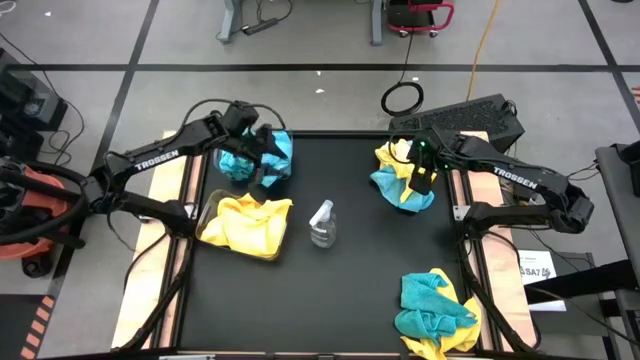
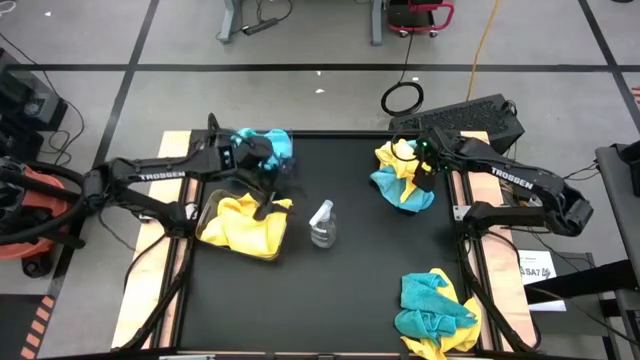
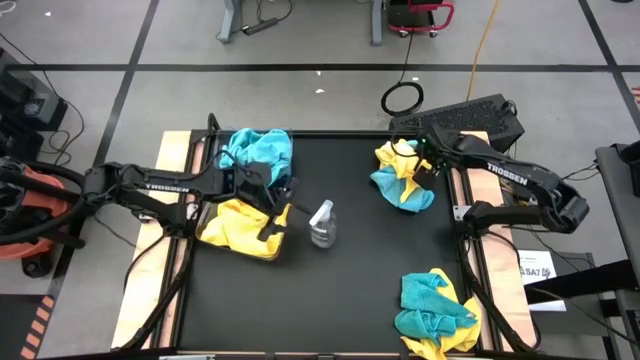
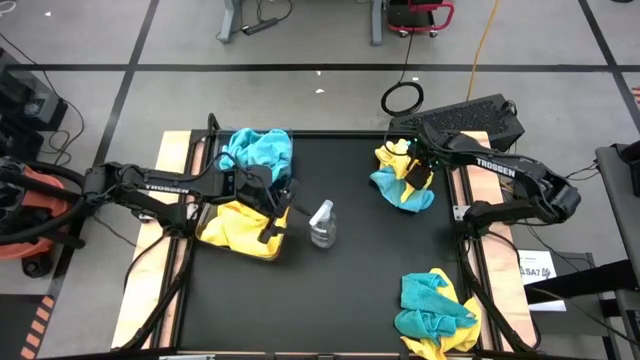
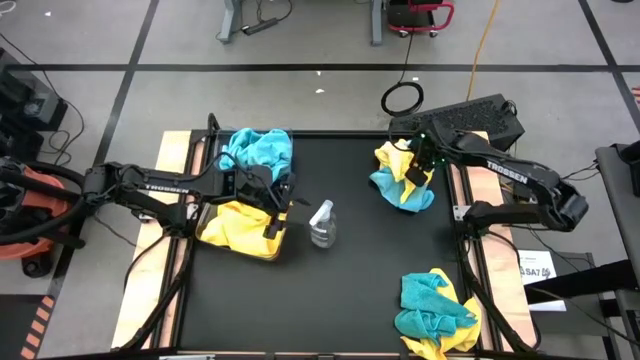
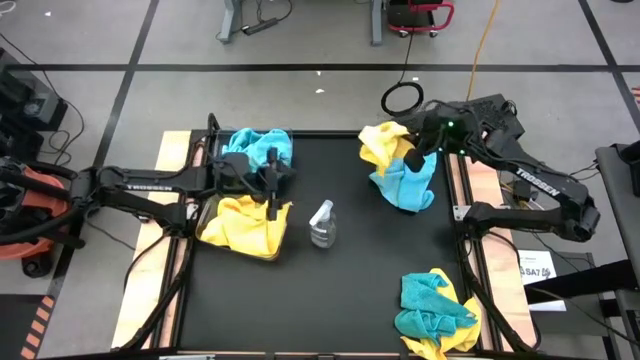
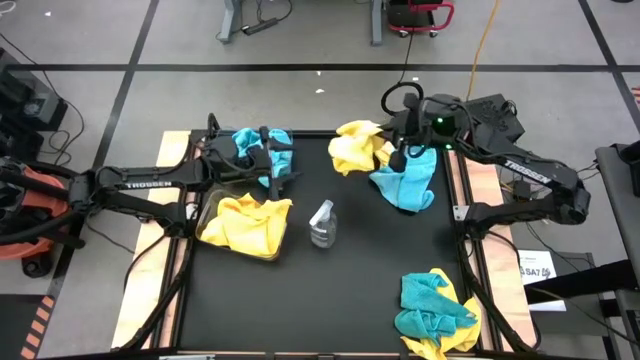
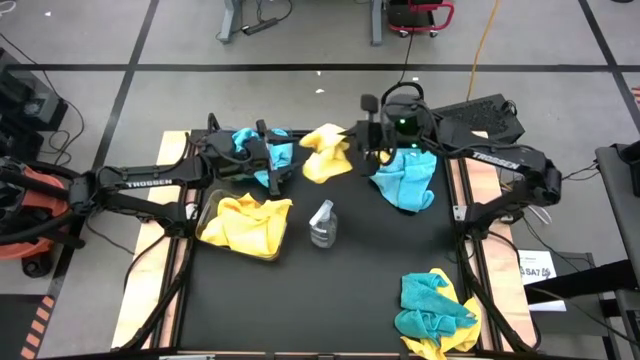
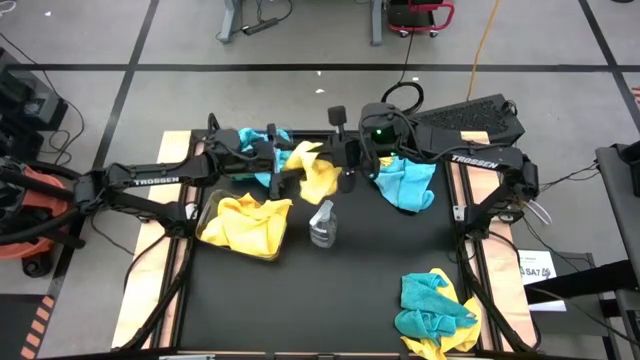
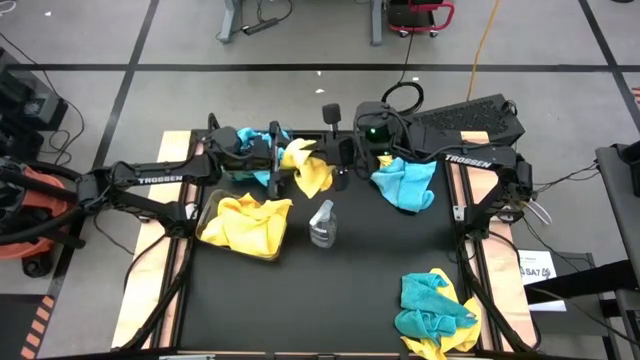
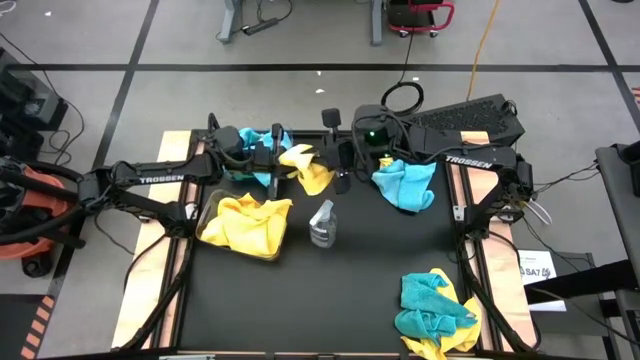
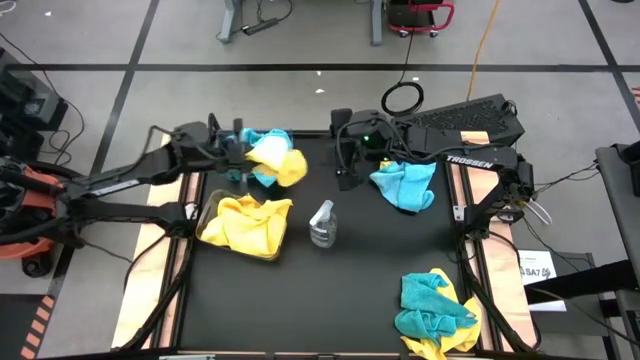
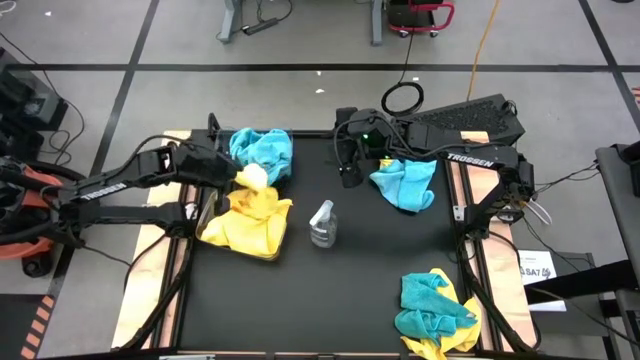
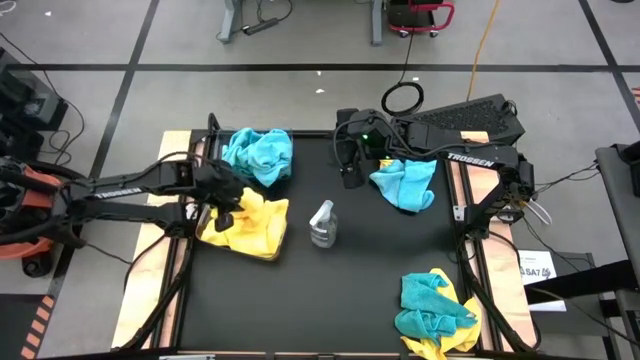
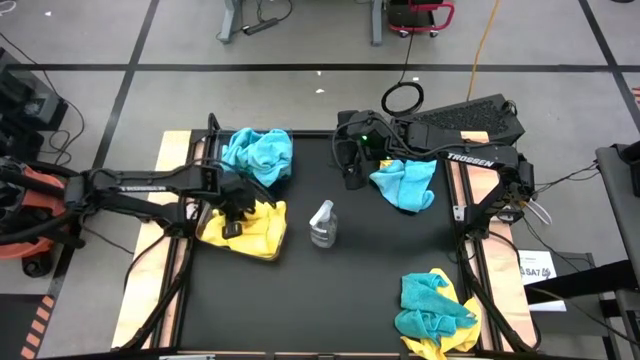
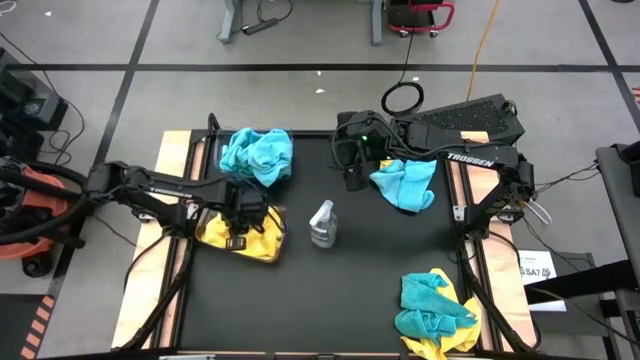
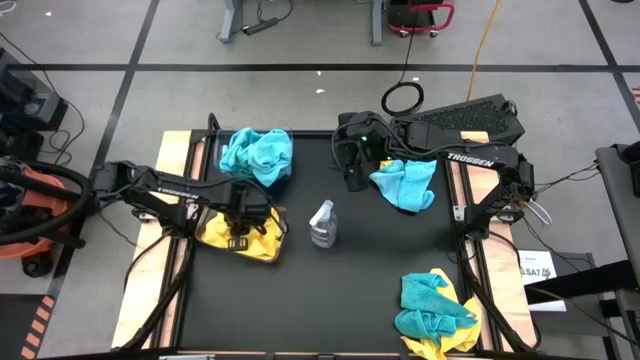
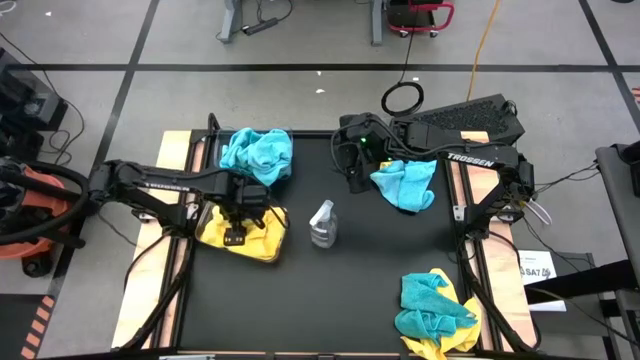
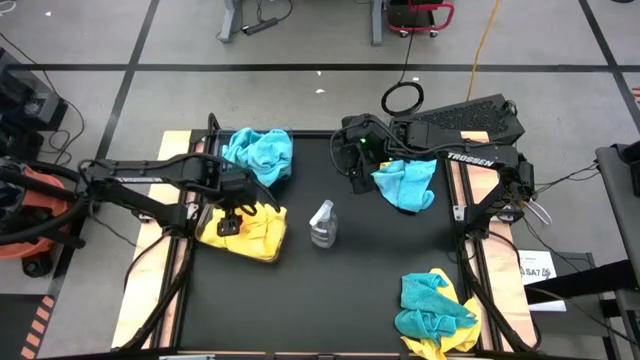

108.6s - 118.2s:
Task: Sort microfiber towel by color & place in baskets
Put the yellow microfiber cloth into the bottom transparent bin

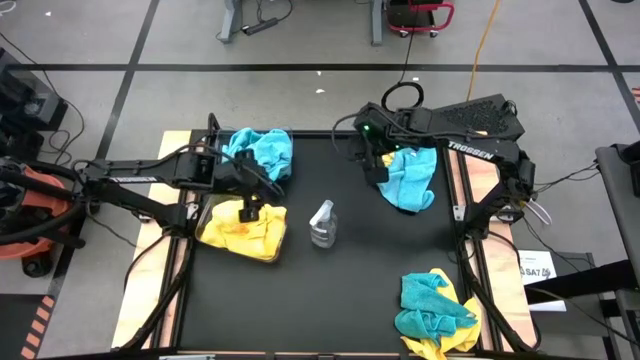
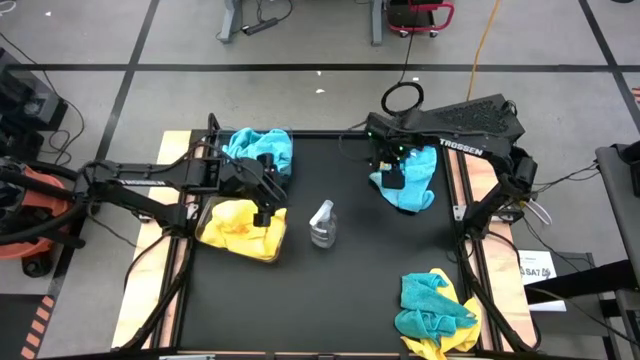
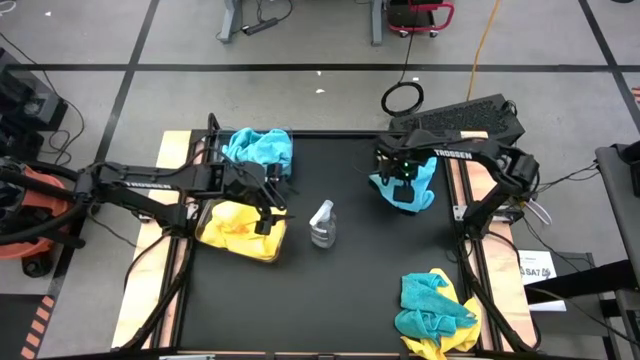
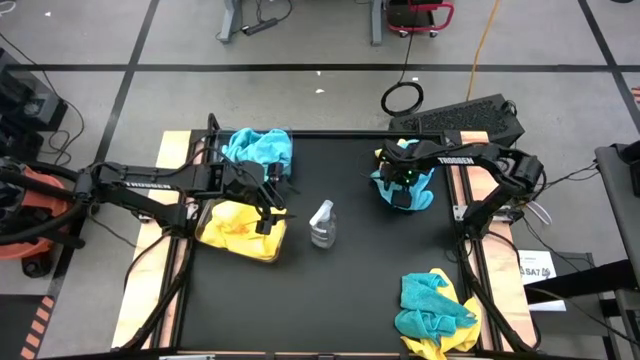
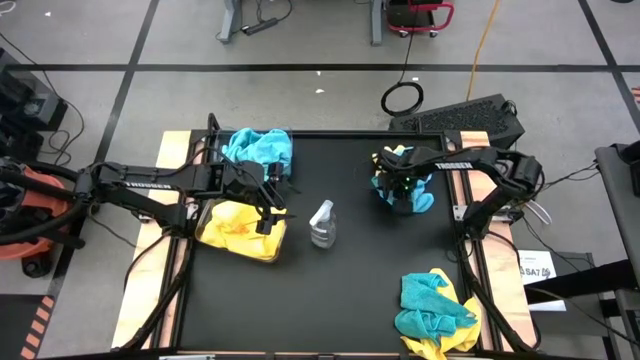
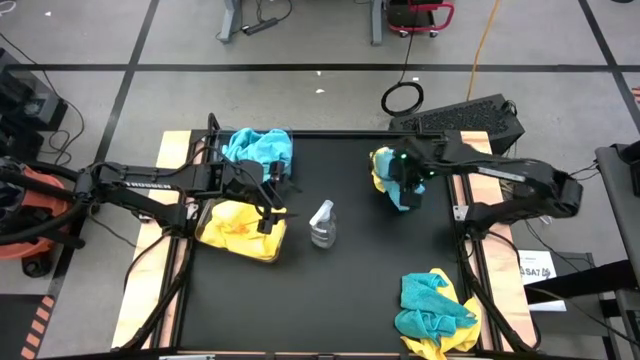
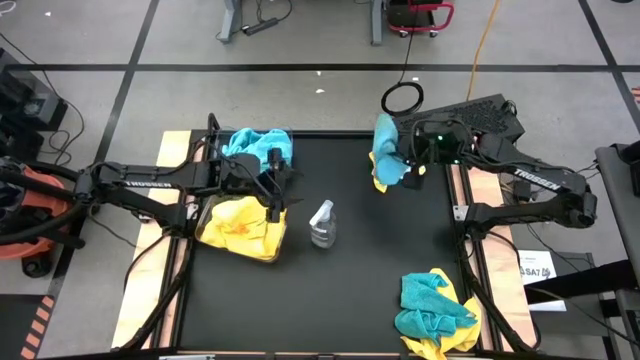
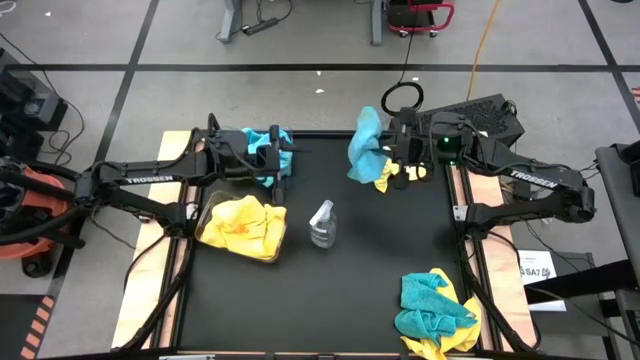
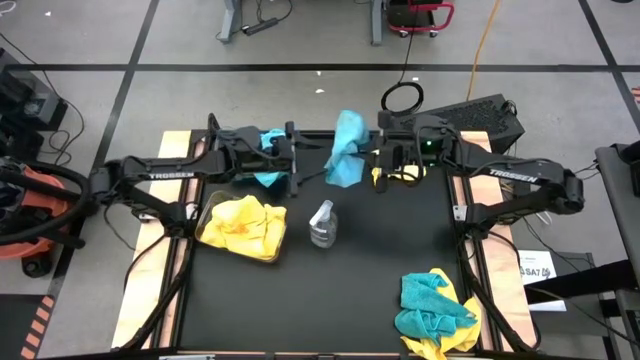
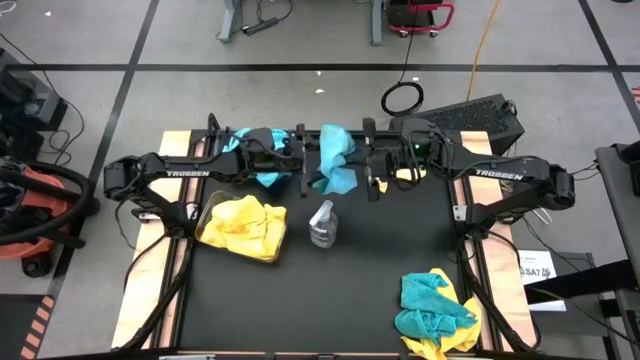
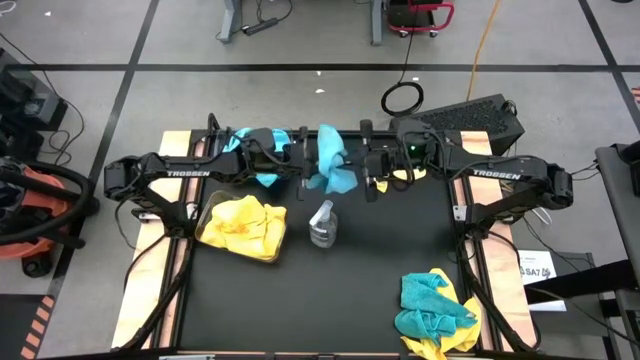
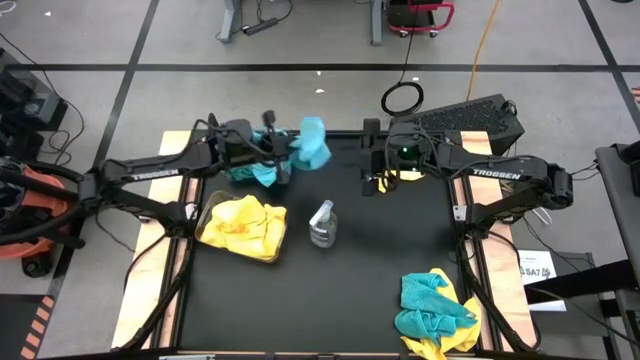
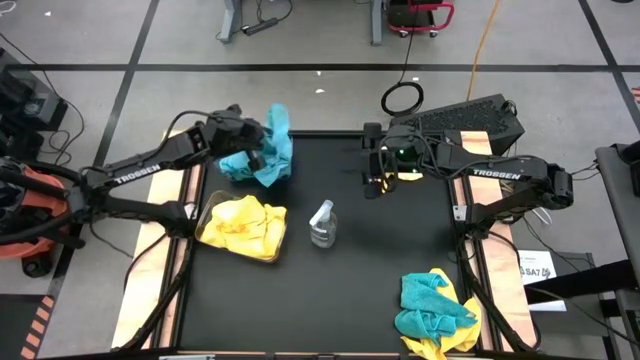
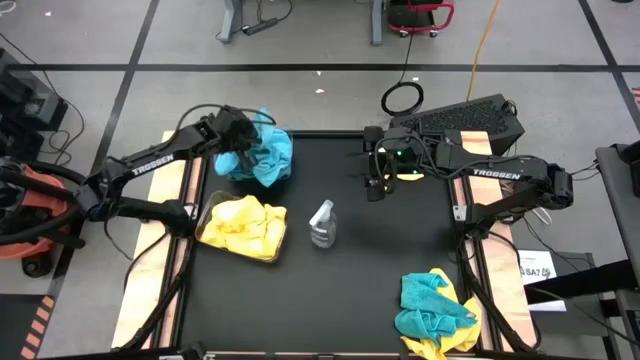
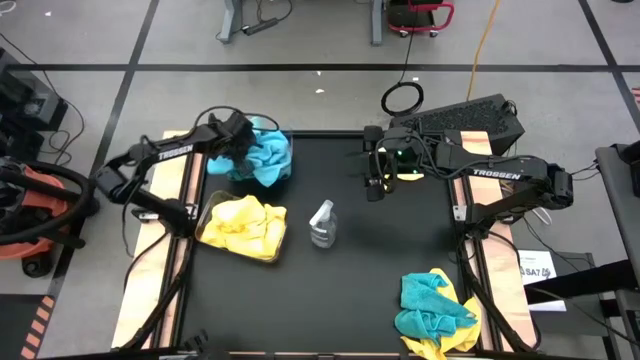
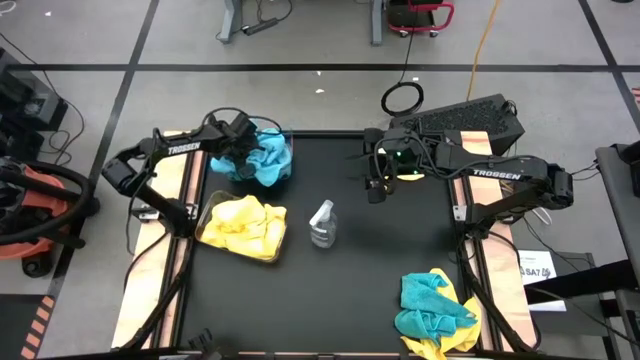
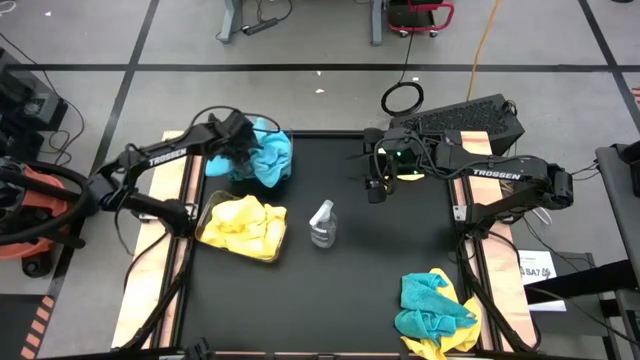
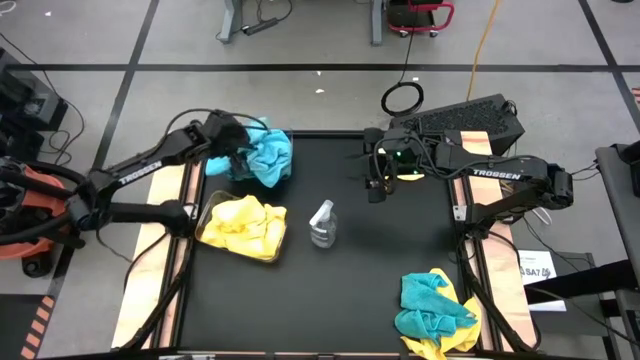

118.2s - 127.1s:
Put the blue microfiber cloth into the top transparent bin

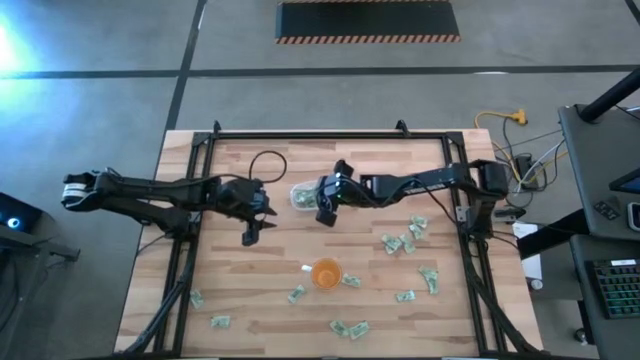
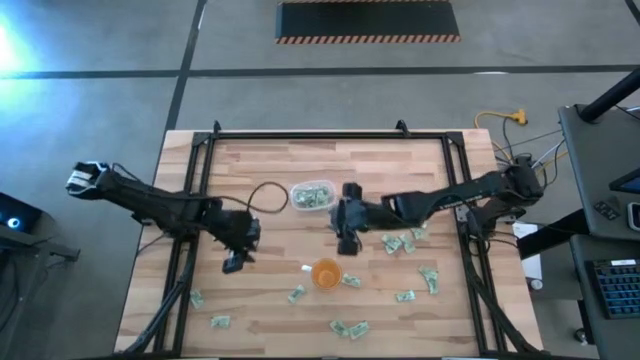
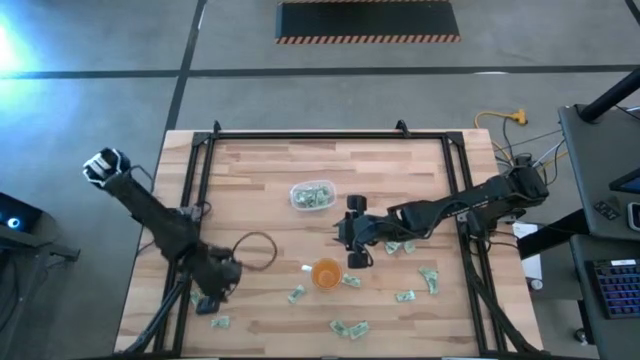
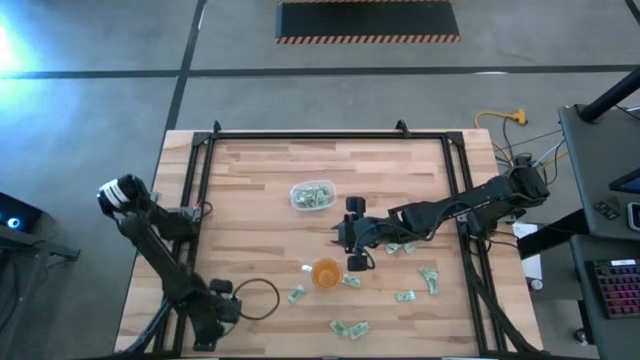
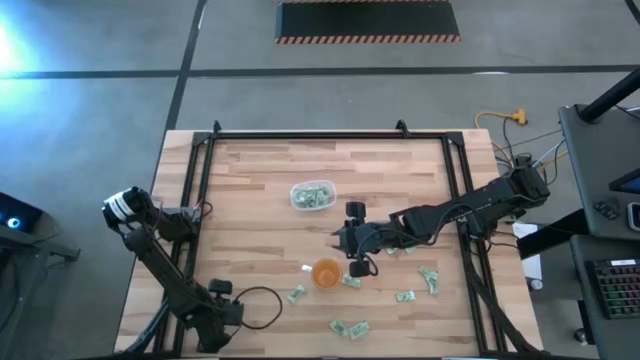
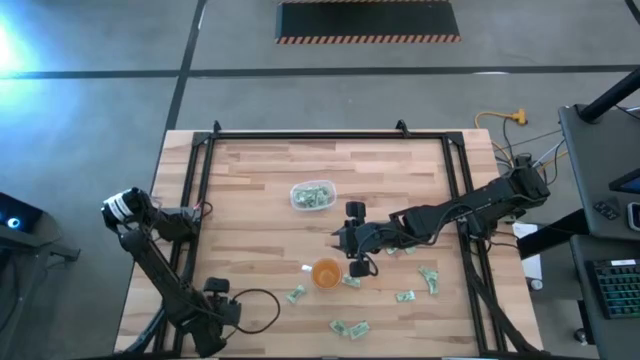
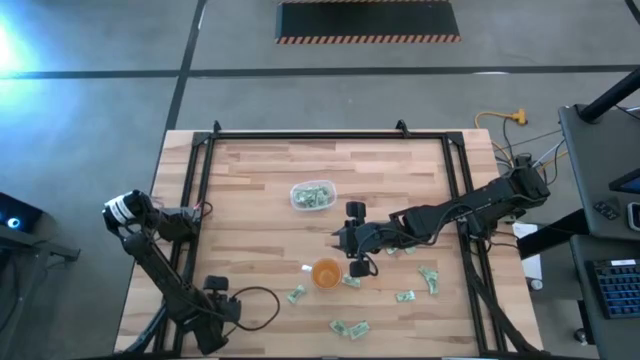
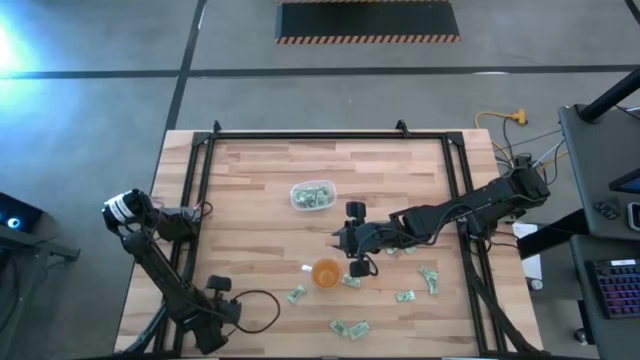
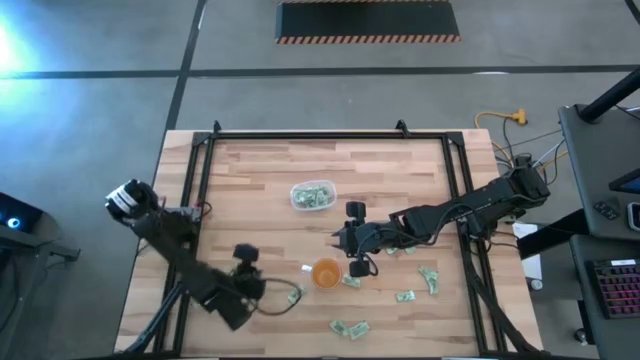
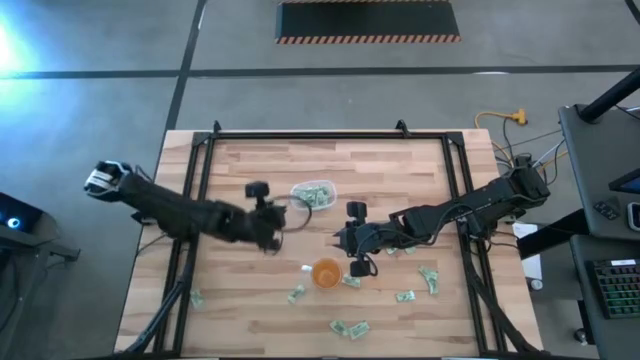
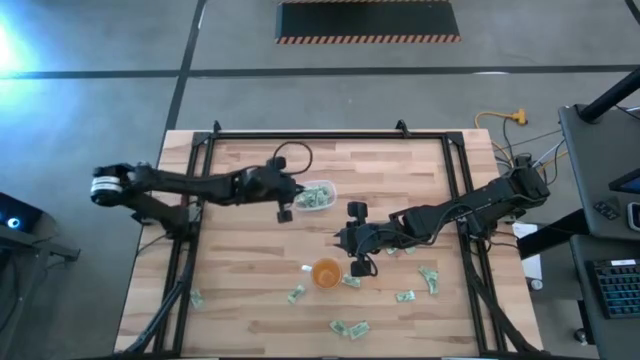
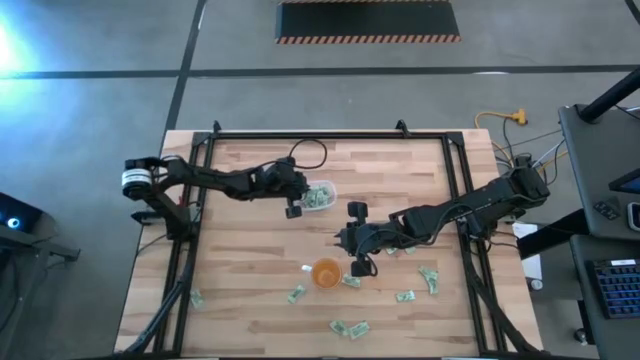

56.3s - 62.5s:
Task: Pick and place Stevia / Truvia into bins
Put the stevia packet into the transparent bin
